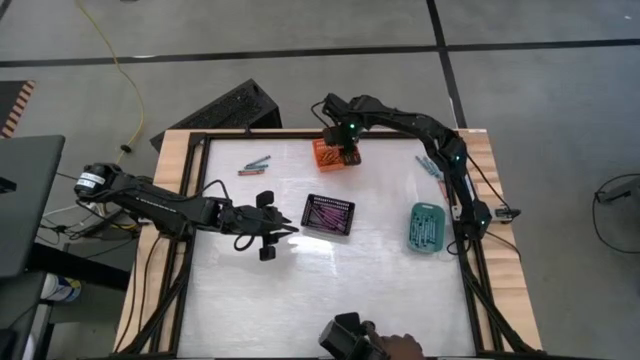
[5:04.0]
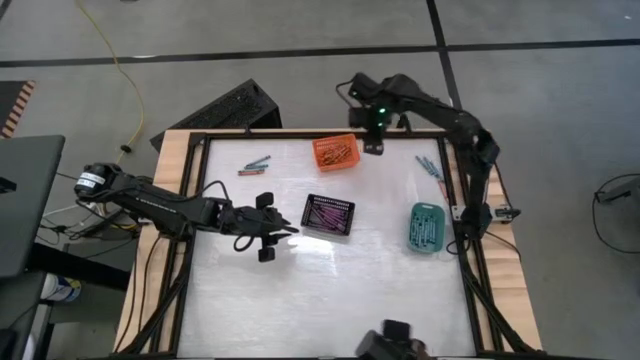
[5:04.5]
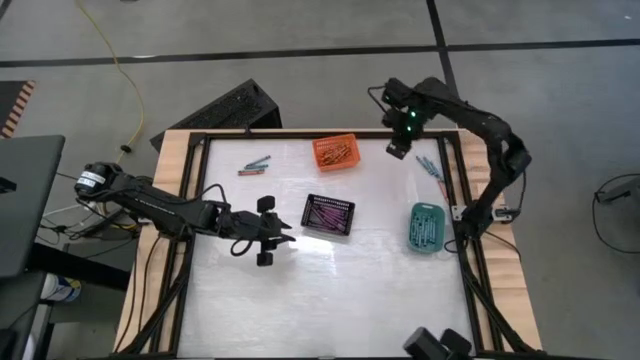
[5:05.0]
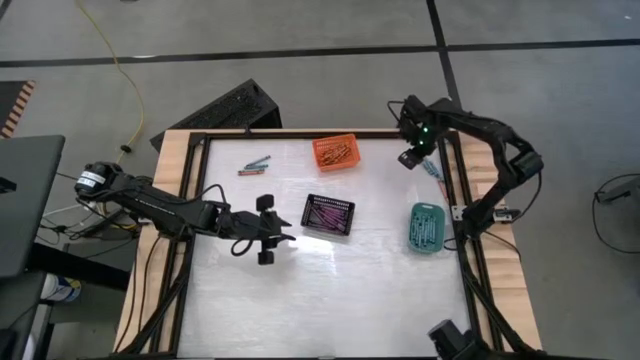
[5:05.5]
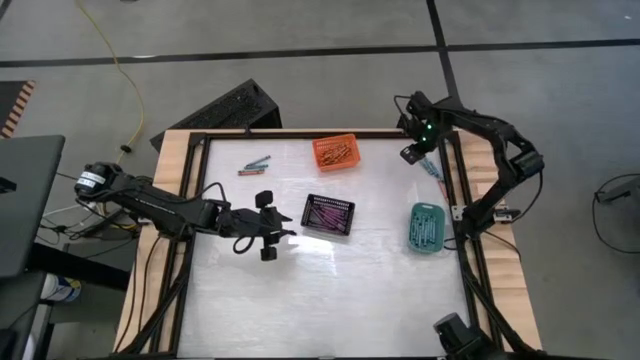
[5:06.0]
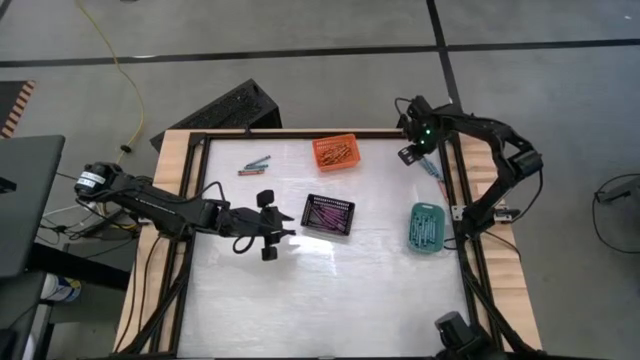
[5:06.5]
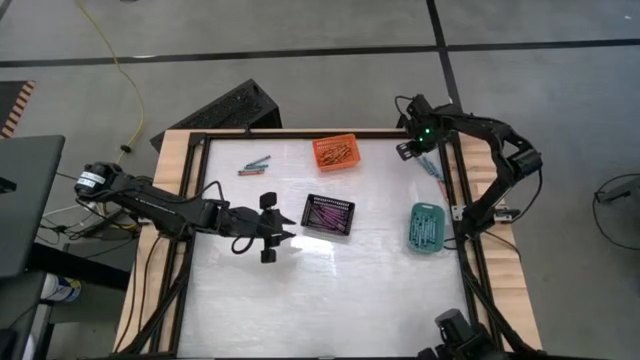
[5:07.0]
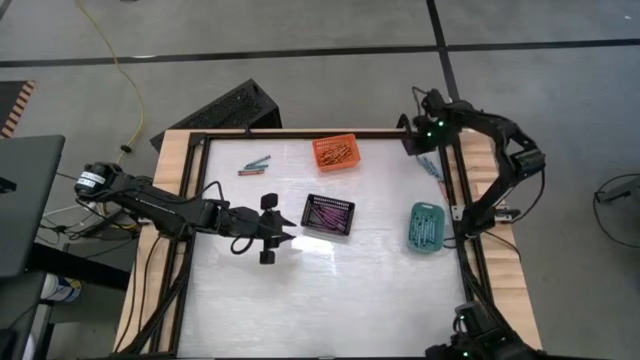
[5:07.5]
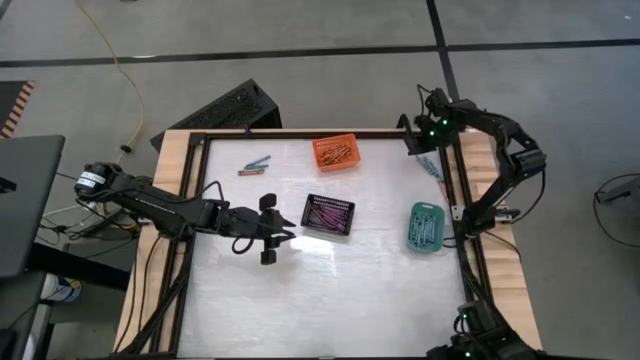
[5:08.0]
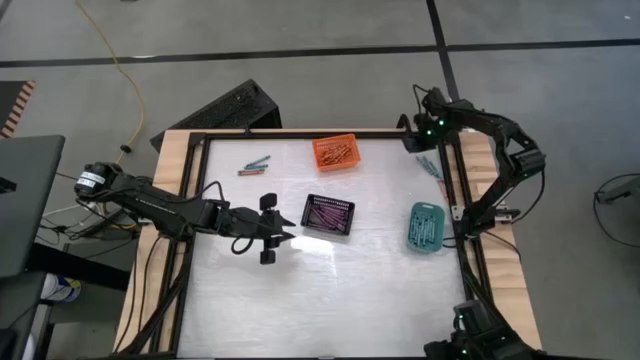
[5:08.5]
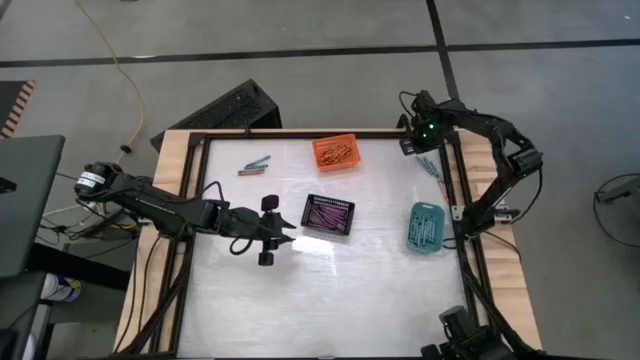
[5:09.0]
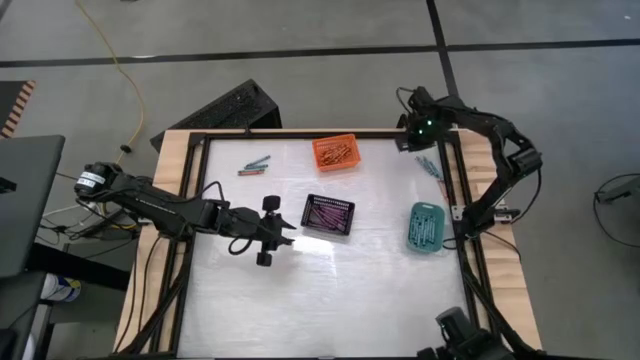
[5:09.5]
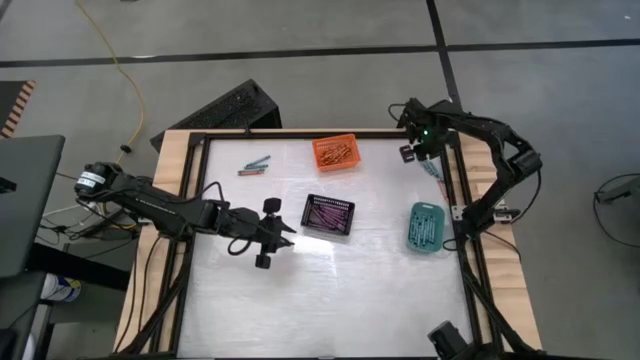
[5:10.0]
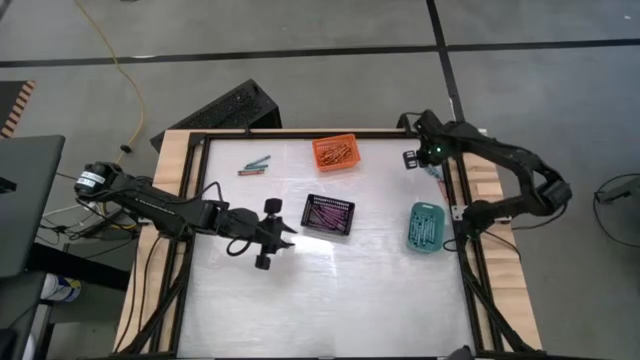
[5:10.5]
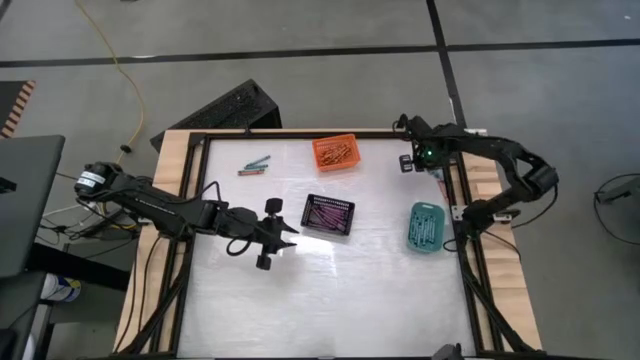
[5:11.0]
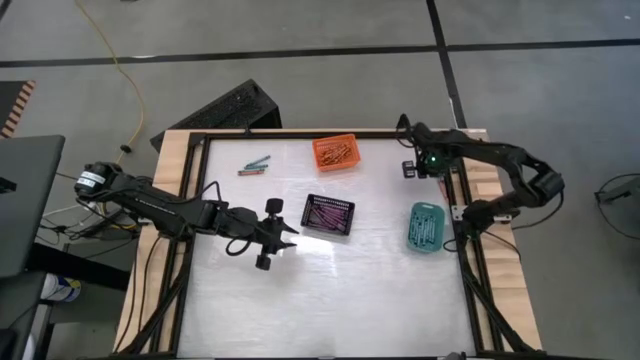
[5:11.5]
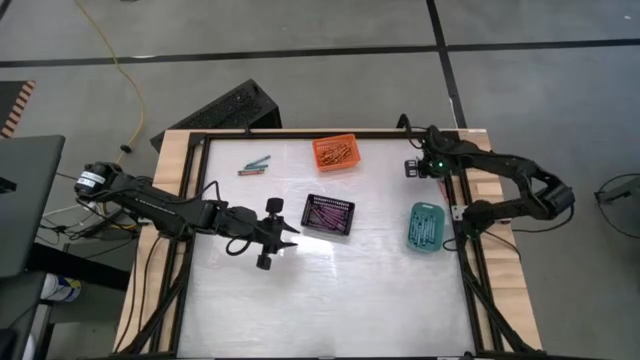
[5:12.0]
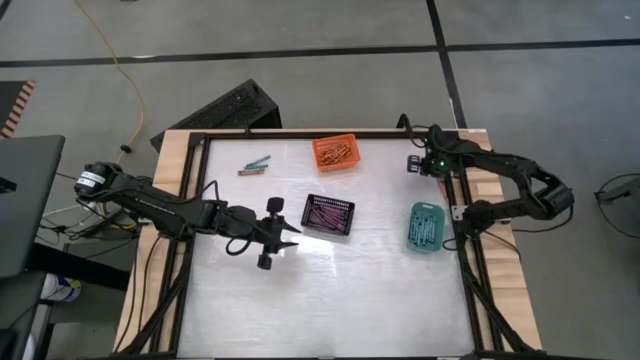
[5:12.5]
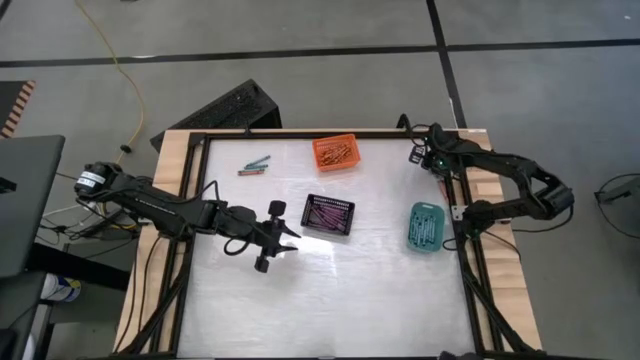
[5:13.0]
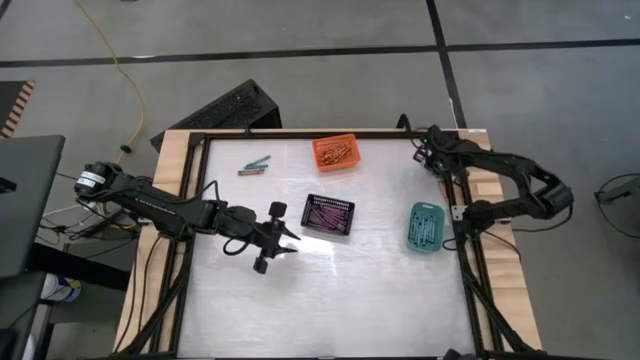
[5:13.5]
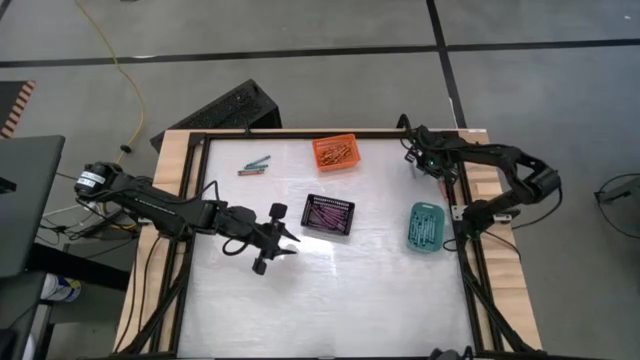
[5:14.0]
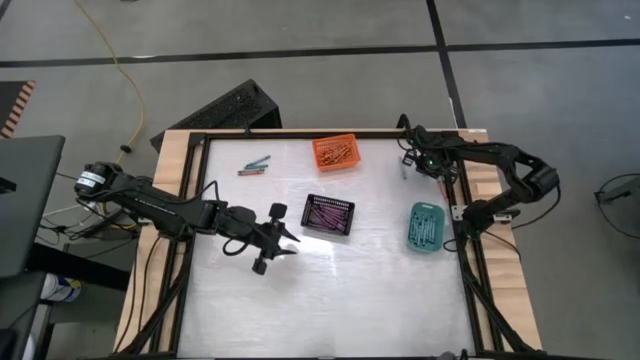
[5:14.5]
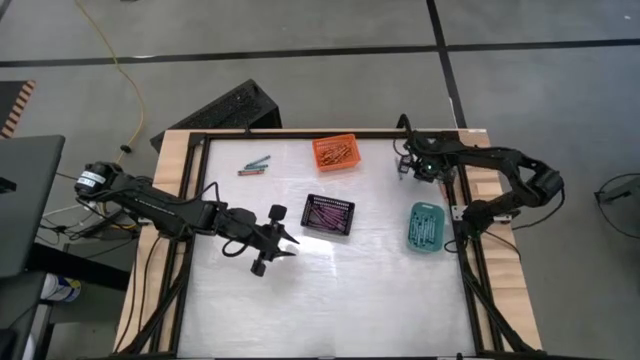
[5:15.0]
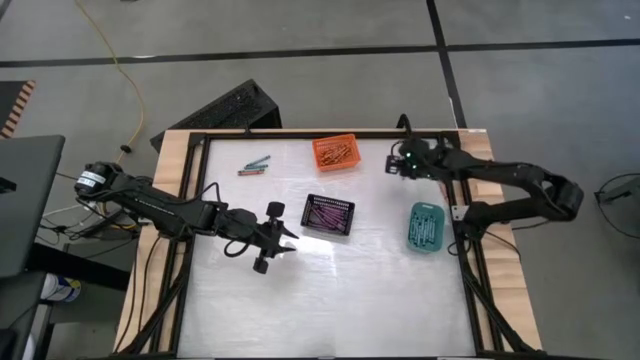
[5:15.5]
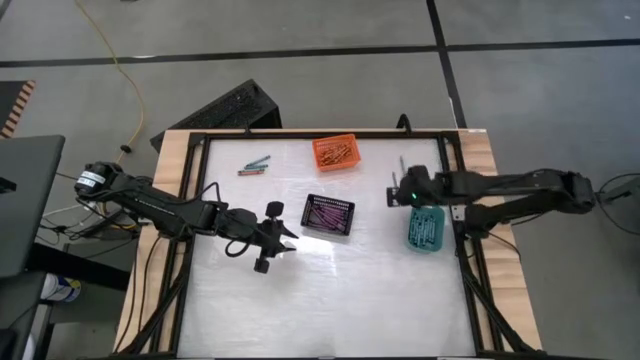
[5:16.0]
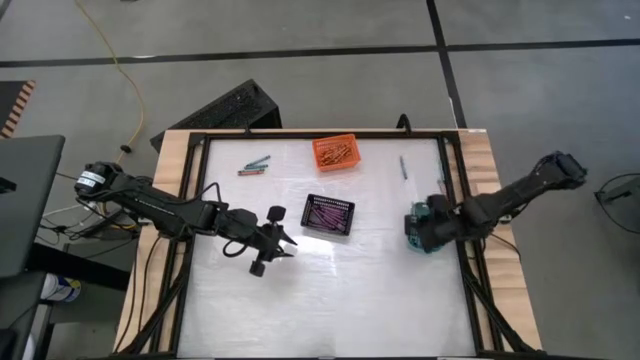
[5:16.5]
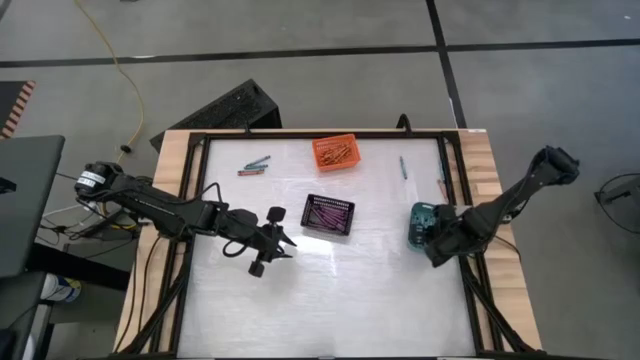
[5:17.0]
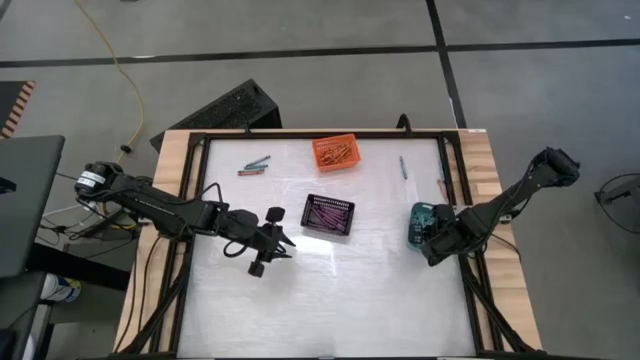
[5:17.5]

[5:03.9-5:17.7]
Task: Sort crayons
Put the light blue green crayon into the green bin

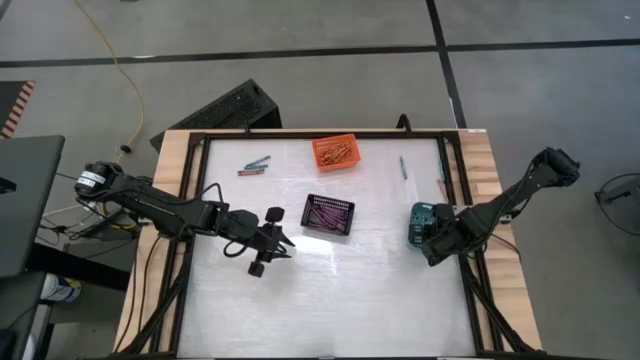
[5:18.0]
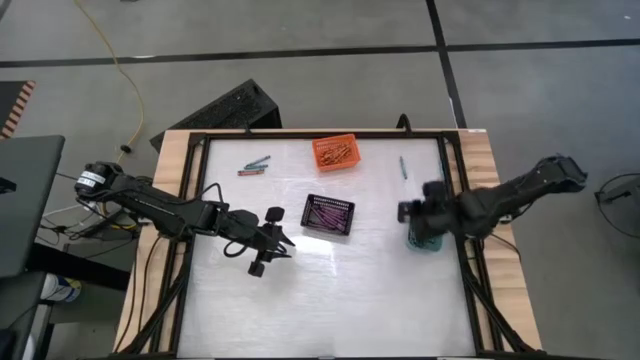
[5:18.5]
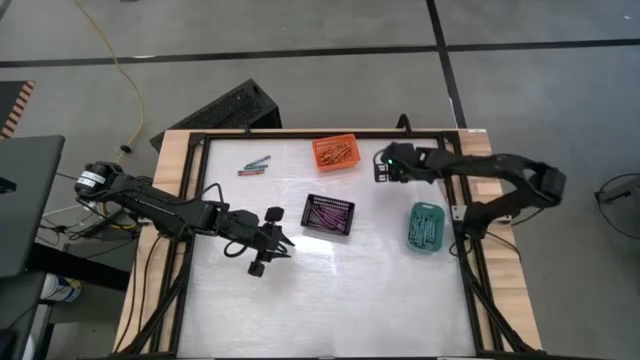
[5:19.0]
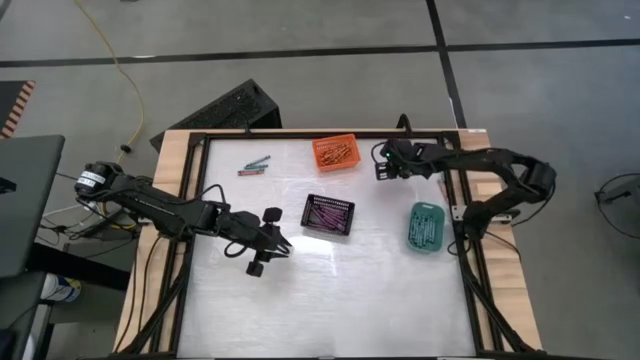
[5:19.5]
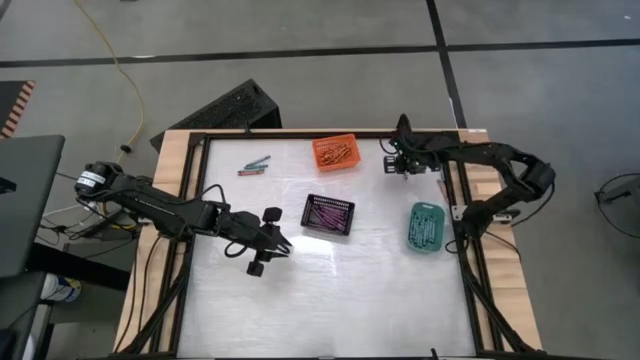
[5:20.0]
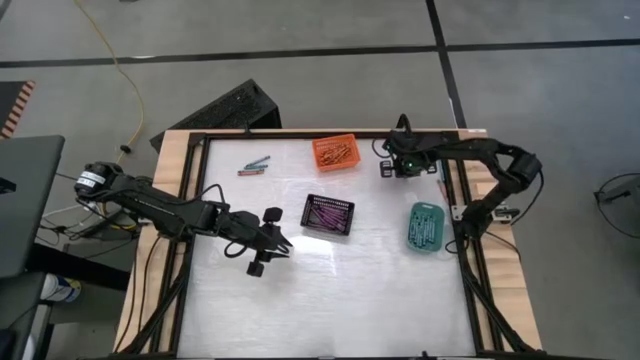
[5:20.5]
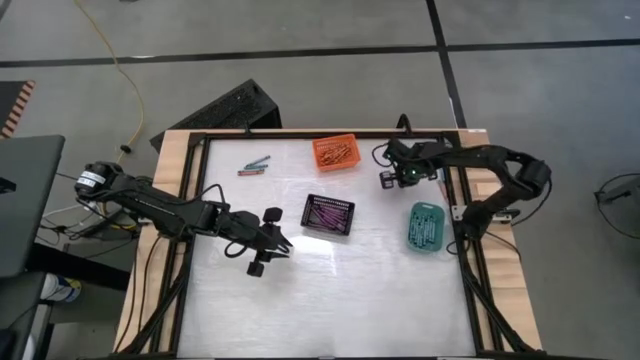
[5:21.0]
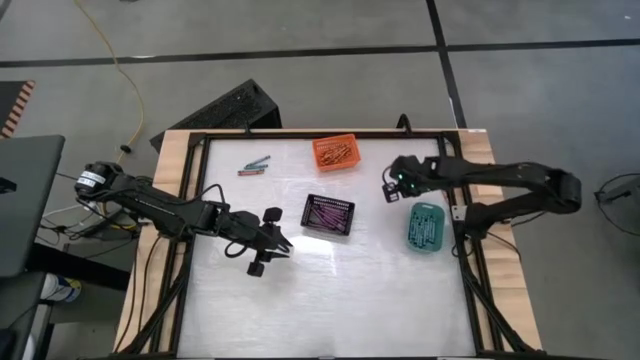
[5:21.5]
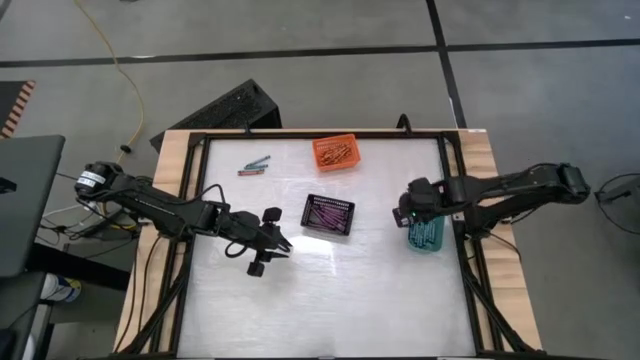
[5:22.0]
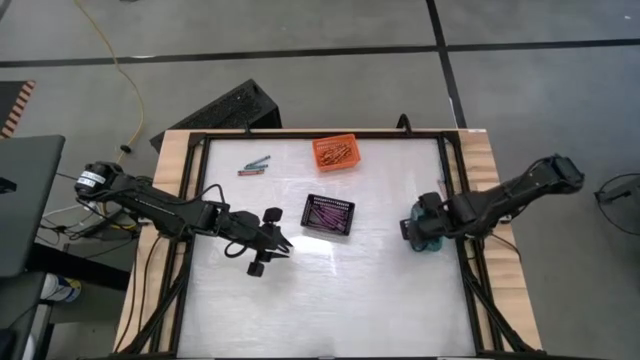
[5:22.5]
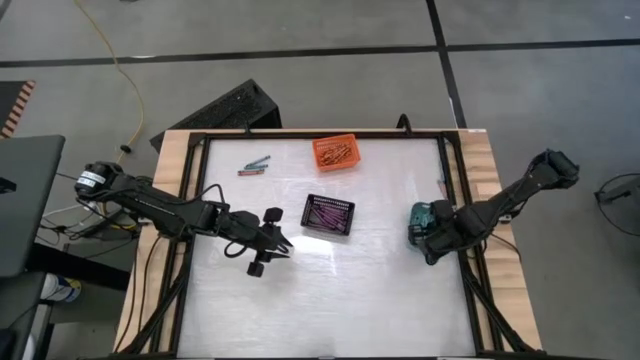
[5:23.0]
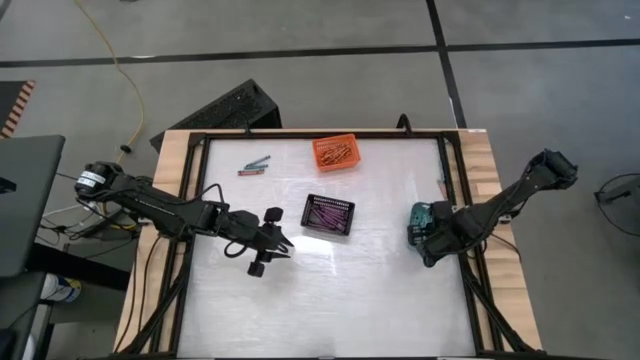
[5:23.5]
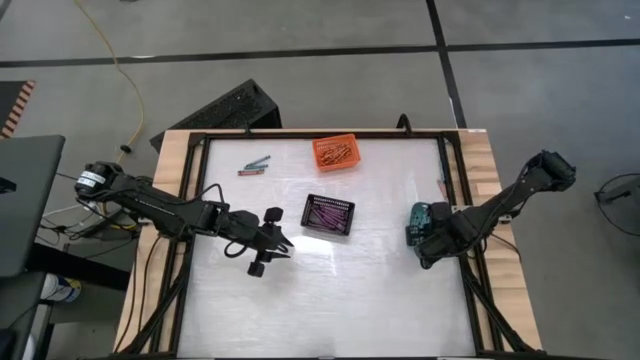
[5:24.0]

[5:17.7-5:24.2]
Put the blue green crayon into the green bin
